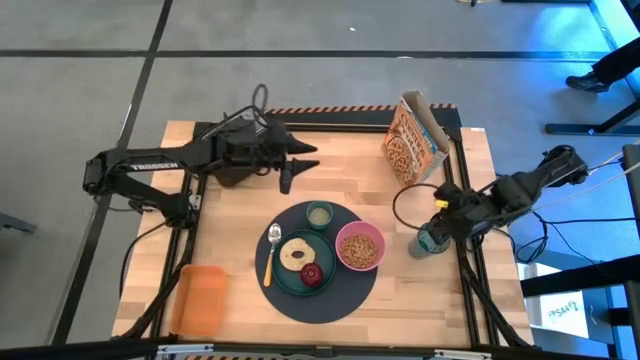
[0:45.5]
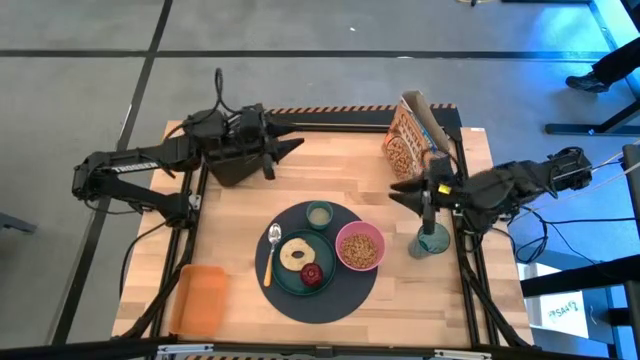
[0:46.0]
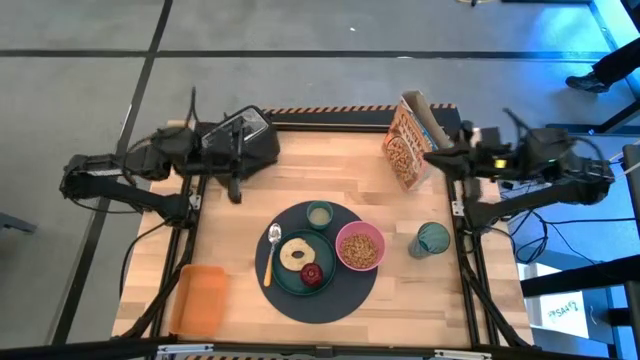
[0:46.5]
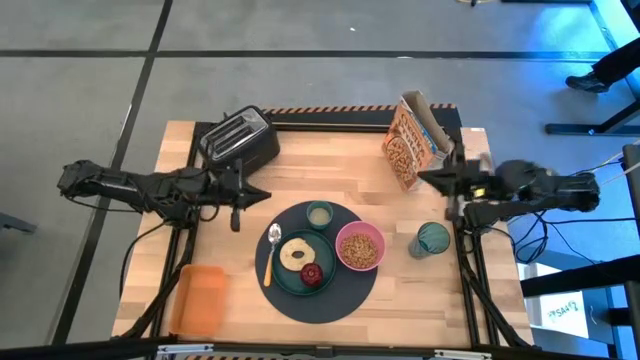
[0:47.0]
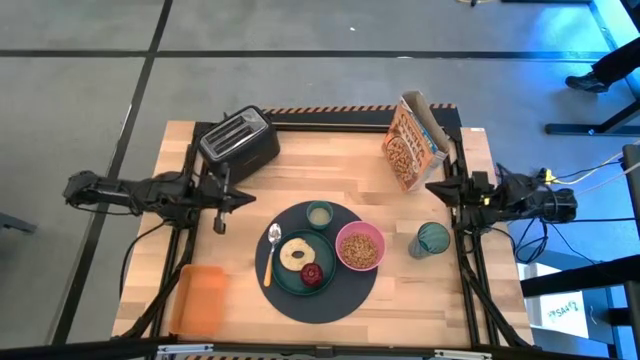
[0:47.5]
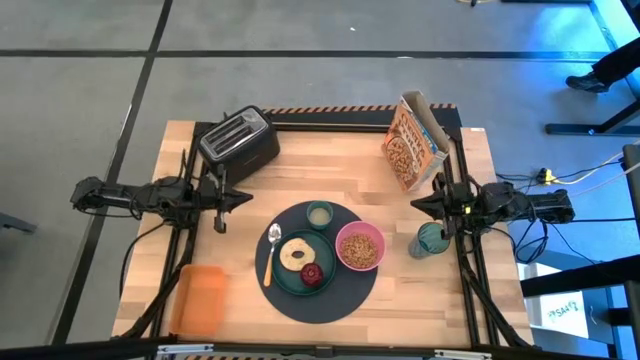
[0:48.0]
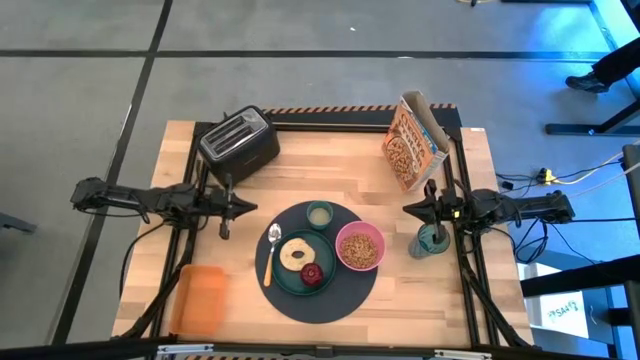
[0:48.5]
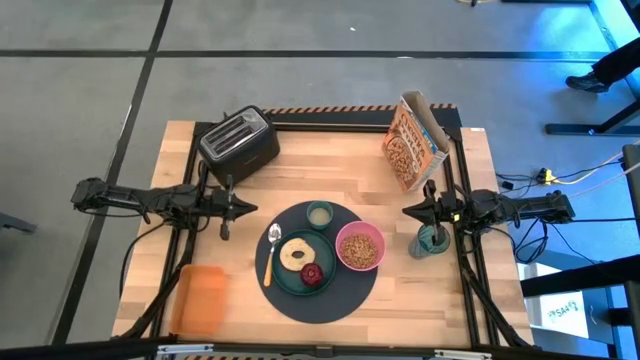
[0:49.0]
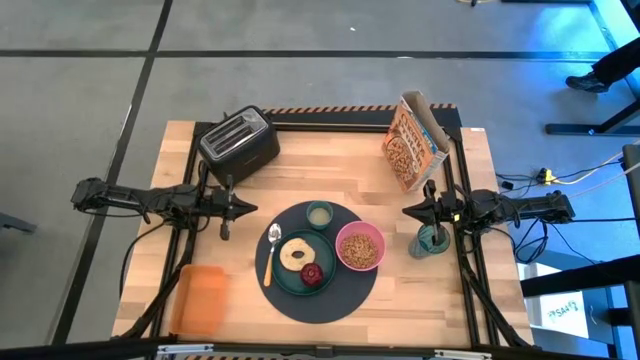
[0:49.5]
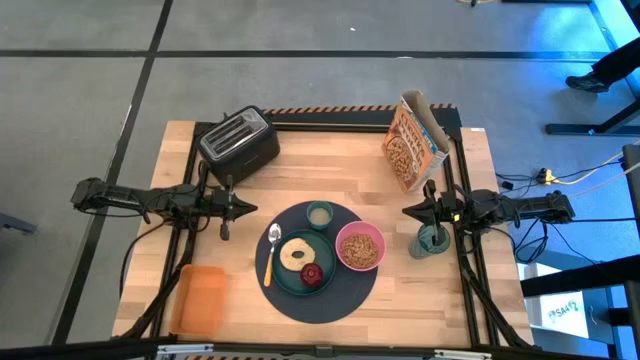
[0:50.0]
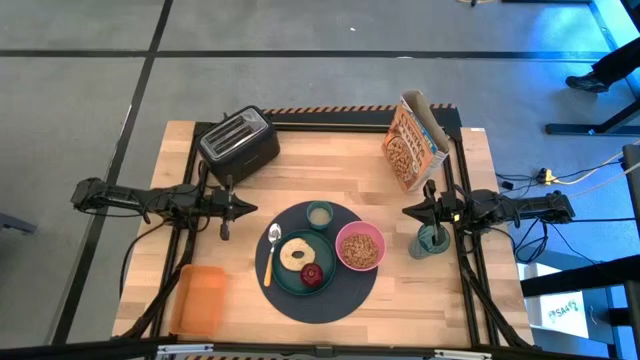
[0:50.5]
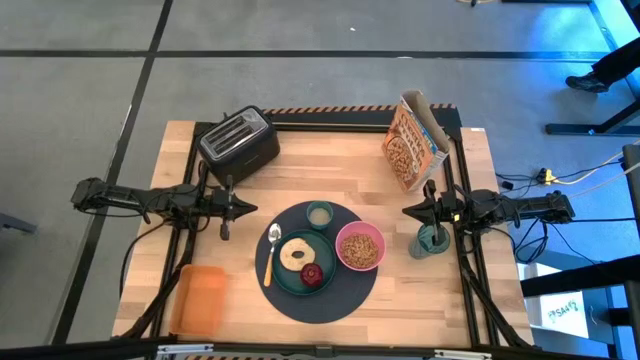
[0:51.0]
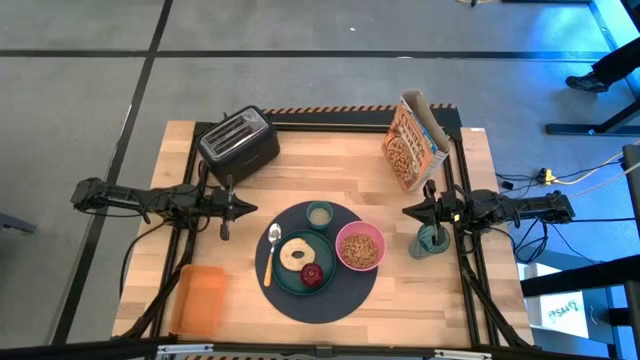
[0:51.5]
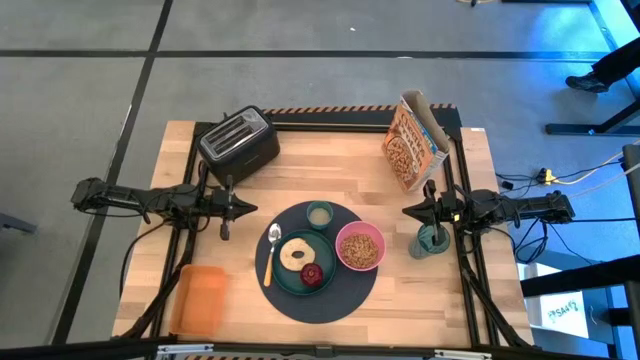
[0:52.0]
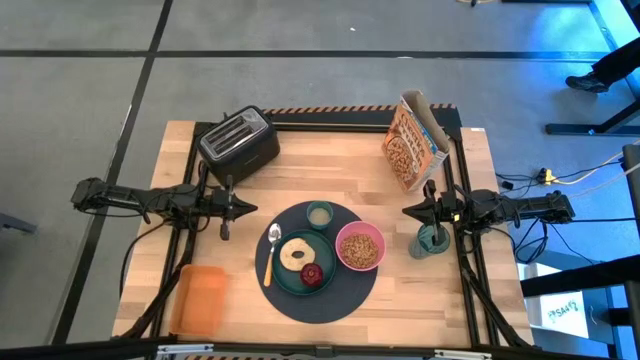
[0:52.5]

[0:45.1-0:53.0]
Task: Arrange a breakfast setting
Return to Home Position

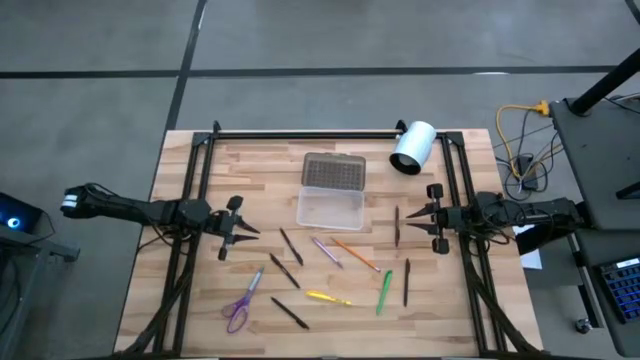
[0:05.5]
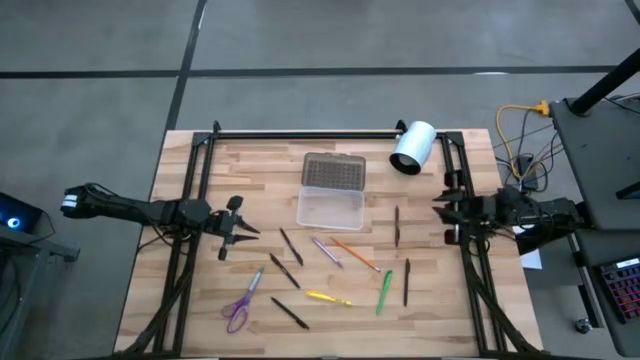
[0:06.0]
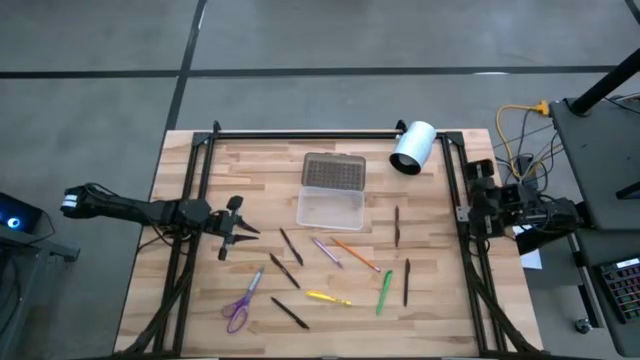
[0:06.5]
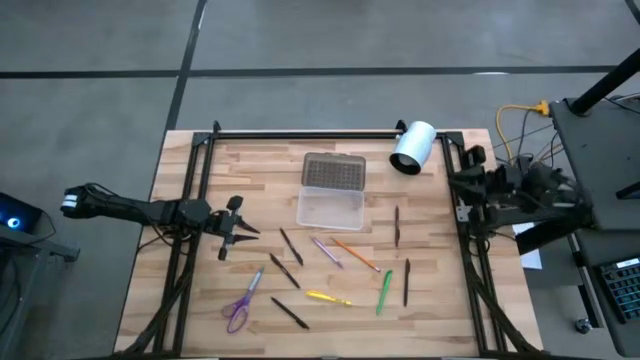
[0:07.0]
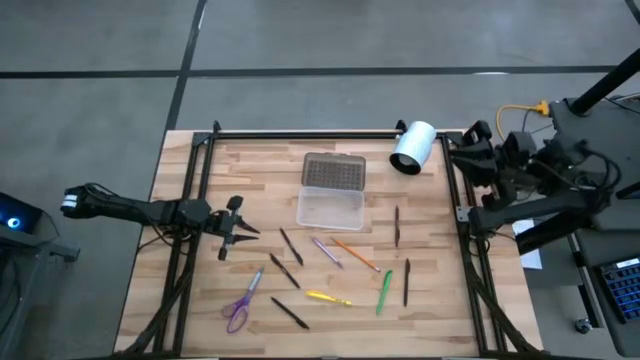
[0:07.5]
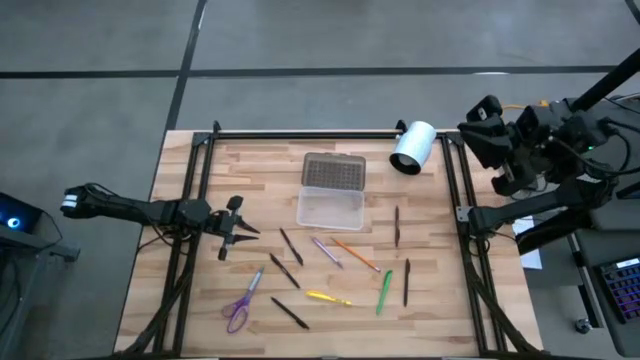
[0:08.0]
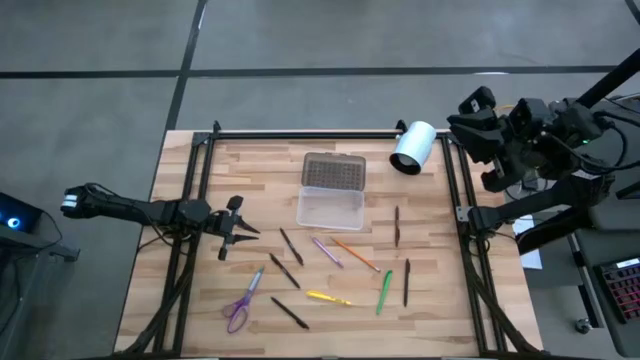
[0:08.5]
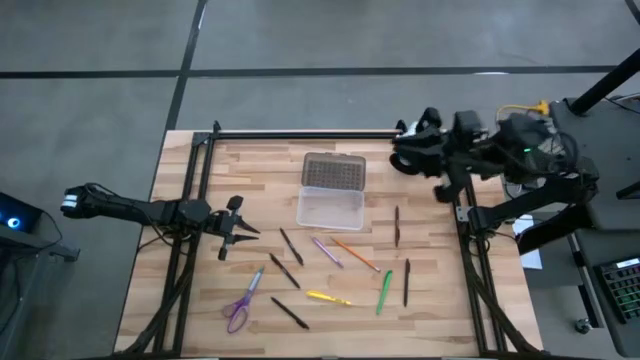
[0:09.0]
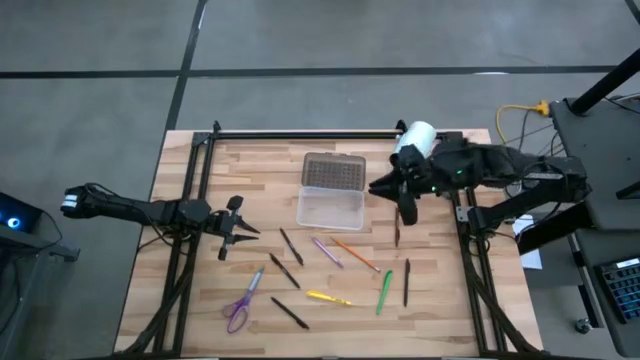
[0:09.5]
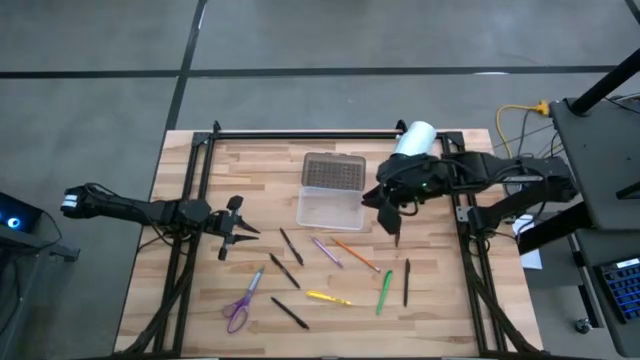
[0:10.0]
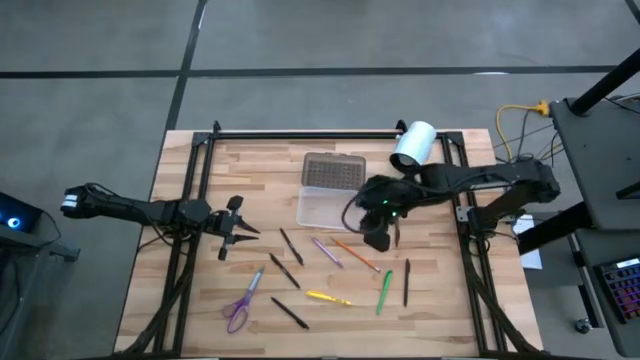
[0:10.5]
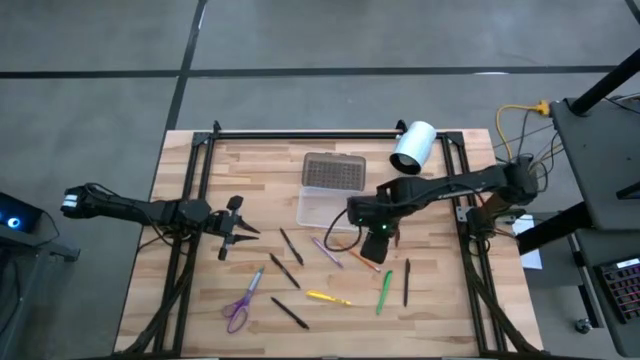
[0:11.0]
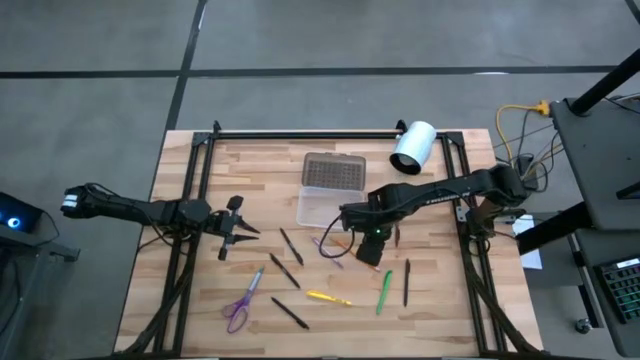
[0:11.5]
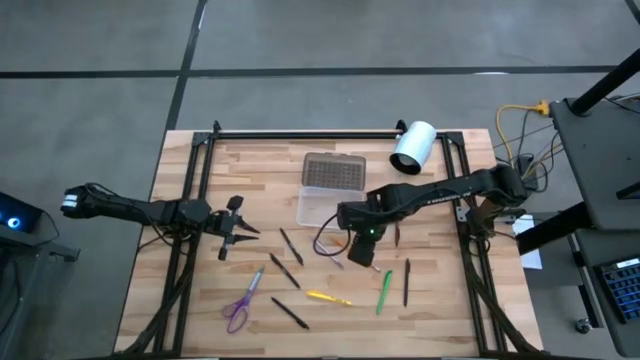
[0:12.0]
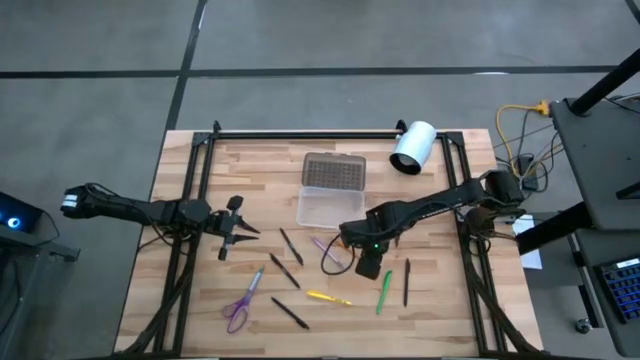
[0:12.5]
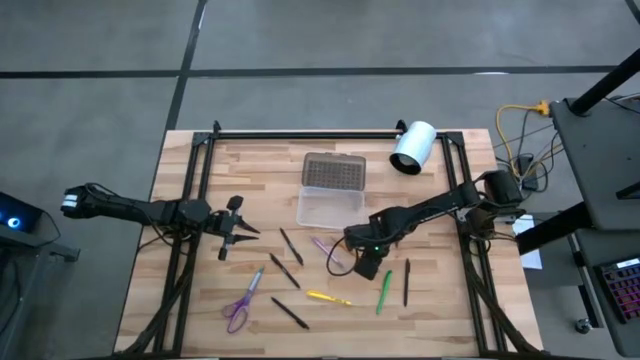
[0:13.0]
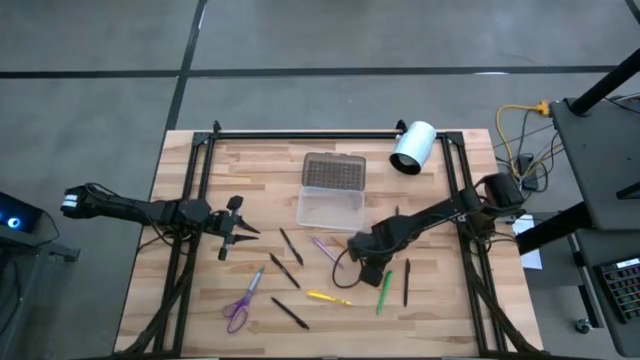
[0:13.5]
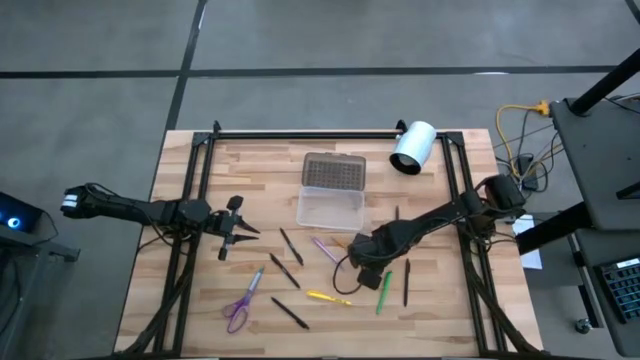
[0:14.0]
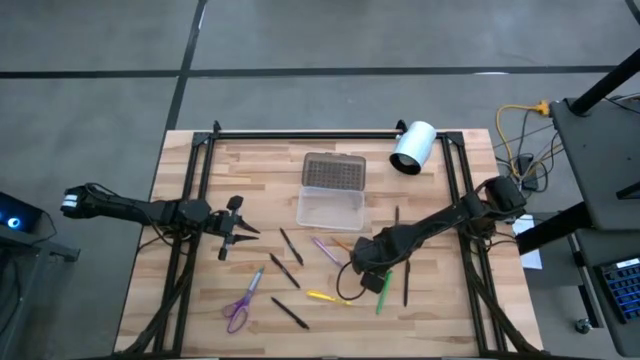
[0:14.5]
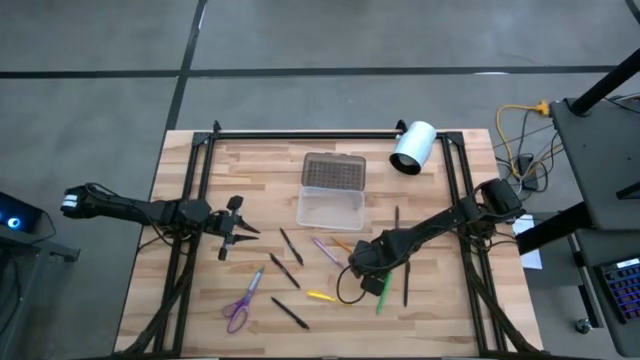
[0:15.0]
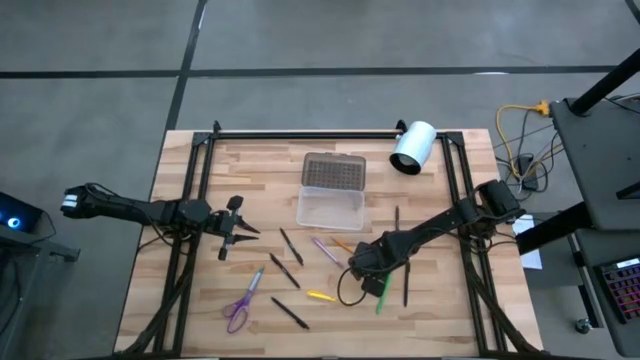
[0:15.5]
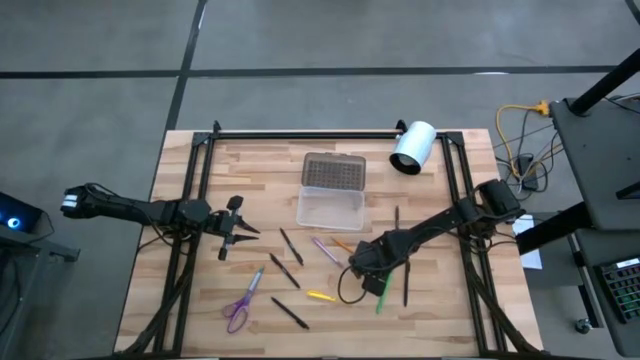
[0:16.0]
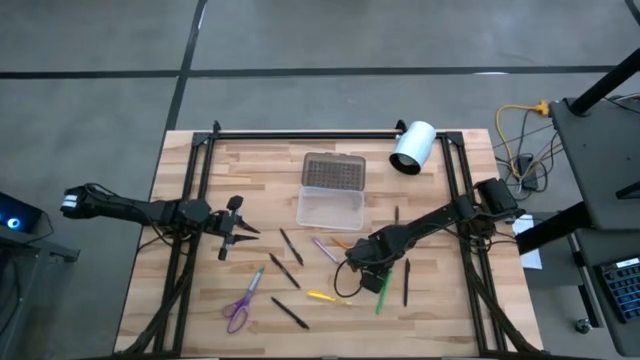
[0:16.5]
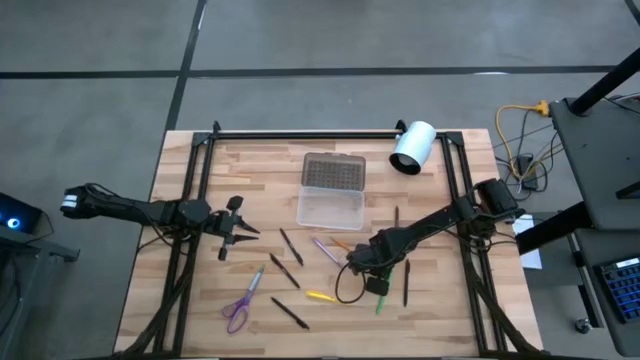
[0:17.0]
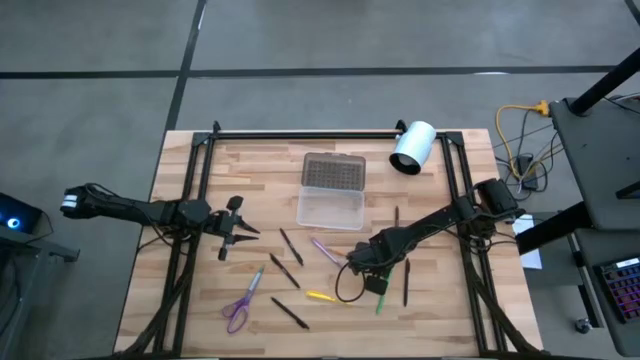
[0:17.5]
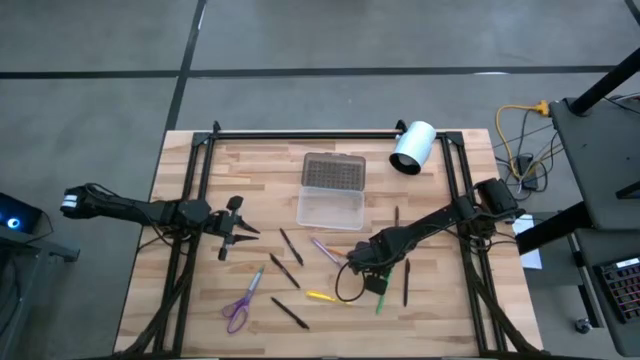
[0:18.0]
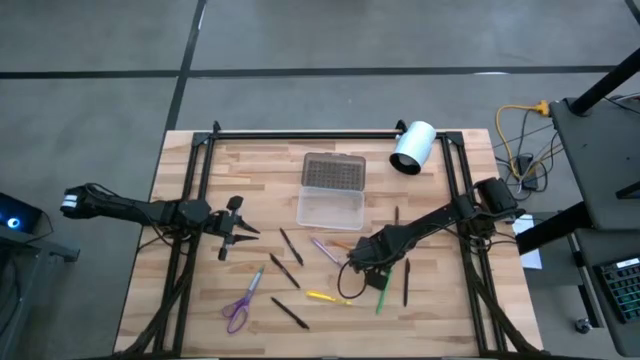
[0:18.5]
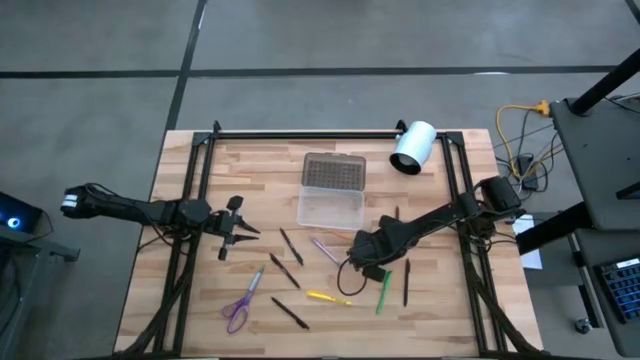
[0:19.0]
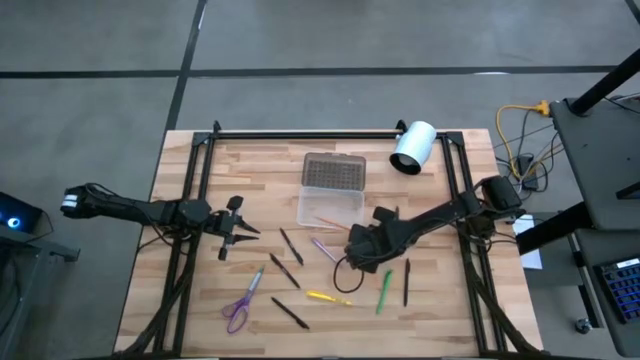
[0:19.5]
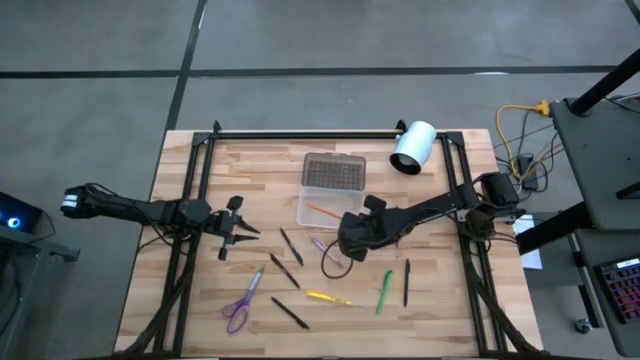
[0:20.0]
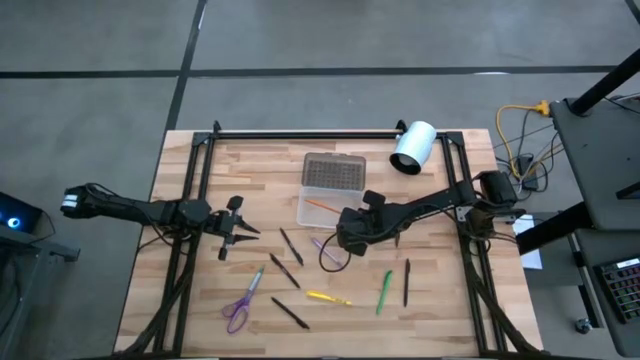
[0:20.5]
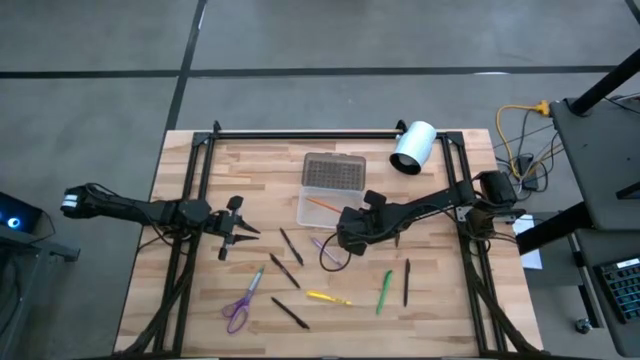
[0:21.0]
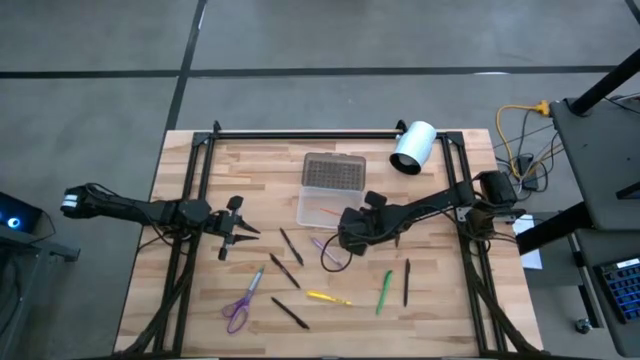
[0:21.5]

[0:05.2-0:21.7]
Task: Pick & place school supplies into a supply box
Put the pencil into the black supply box
